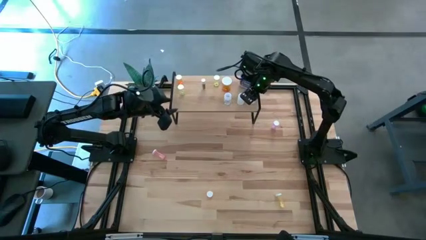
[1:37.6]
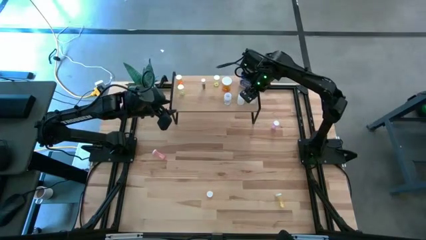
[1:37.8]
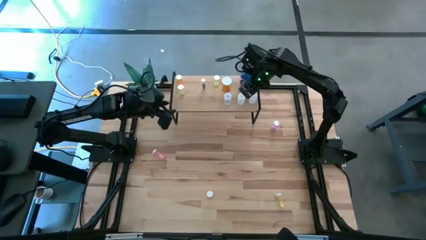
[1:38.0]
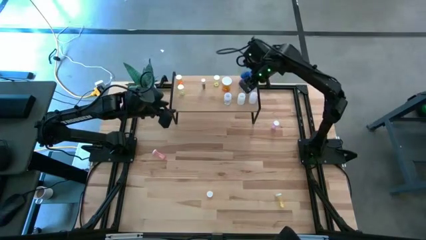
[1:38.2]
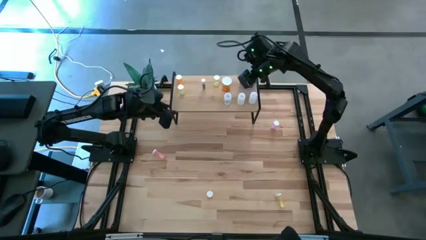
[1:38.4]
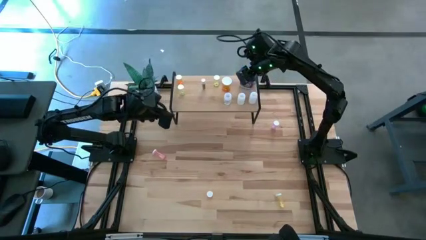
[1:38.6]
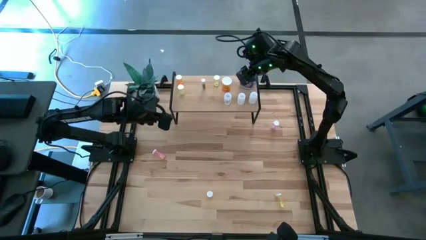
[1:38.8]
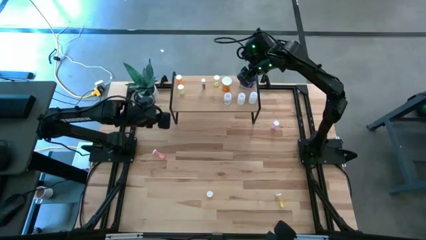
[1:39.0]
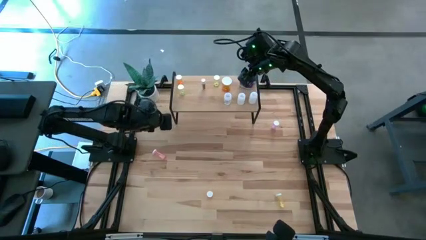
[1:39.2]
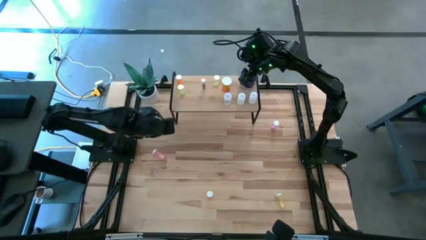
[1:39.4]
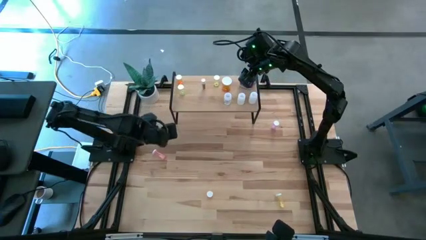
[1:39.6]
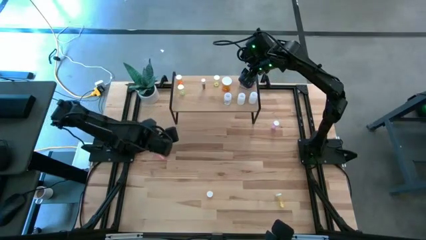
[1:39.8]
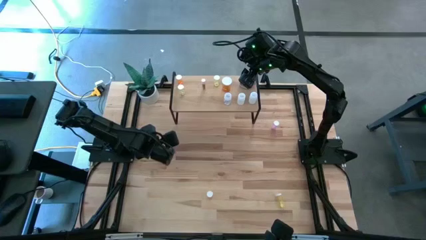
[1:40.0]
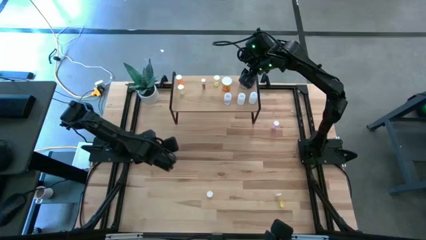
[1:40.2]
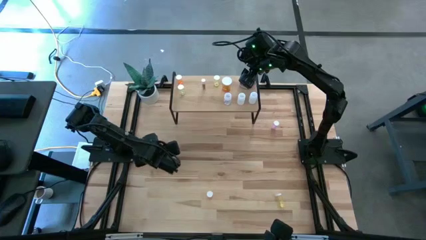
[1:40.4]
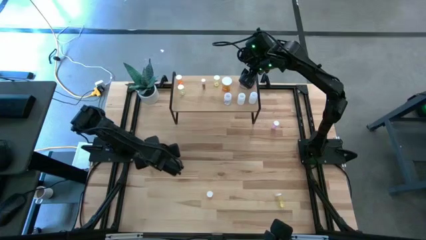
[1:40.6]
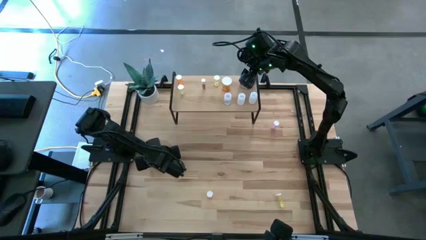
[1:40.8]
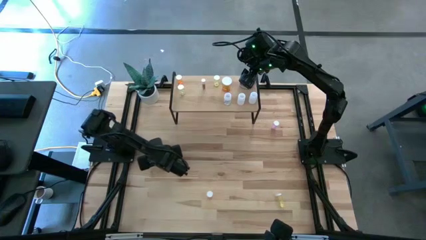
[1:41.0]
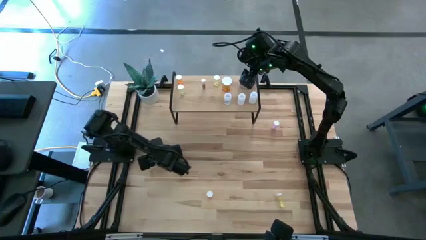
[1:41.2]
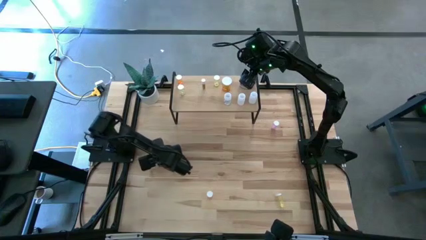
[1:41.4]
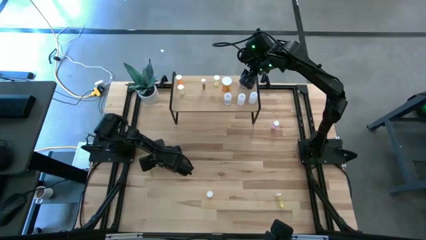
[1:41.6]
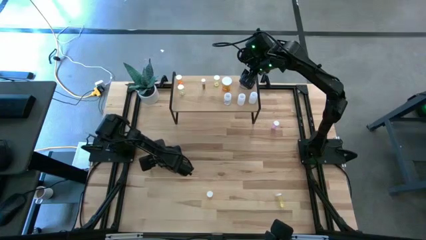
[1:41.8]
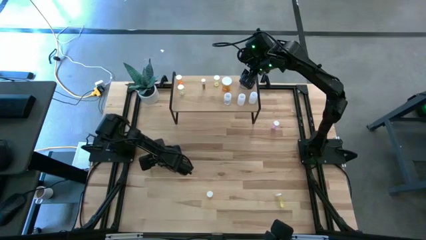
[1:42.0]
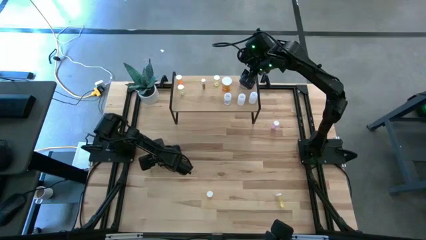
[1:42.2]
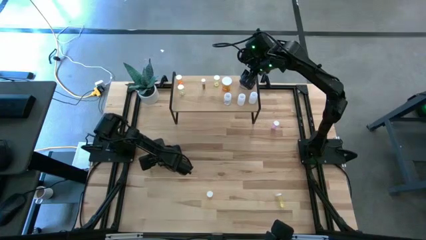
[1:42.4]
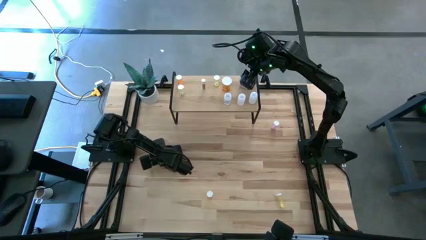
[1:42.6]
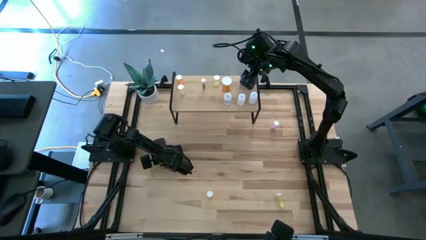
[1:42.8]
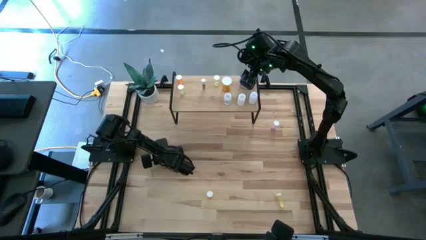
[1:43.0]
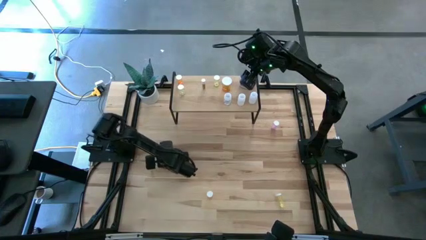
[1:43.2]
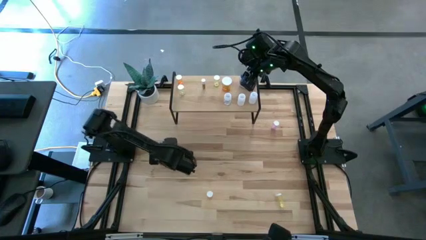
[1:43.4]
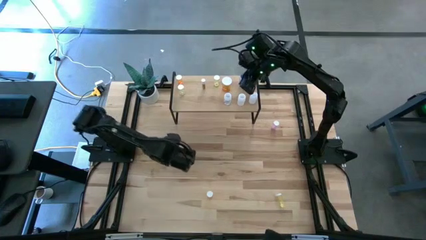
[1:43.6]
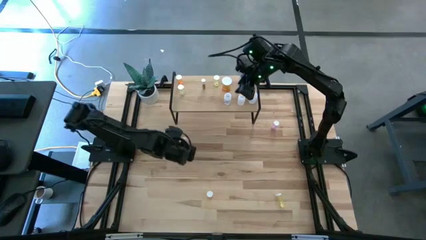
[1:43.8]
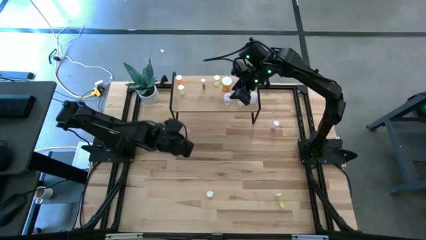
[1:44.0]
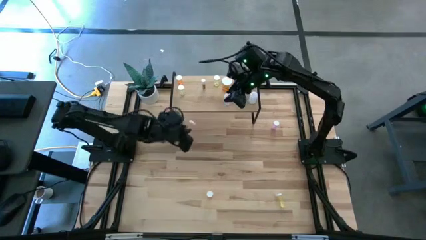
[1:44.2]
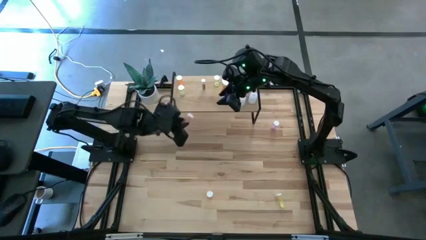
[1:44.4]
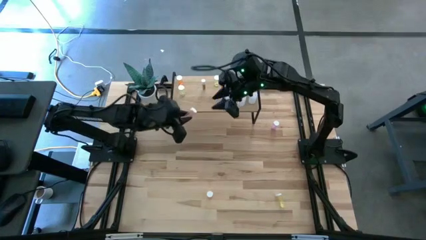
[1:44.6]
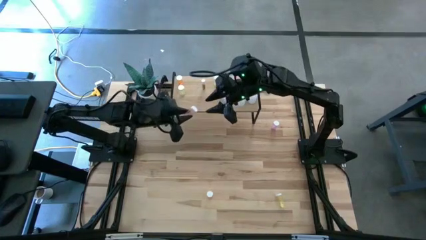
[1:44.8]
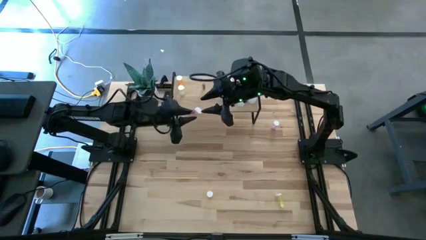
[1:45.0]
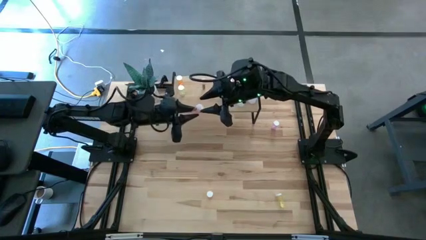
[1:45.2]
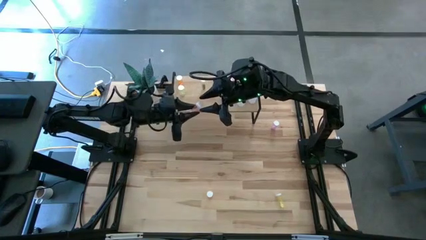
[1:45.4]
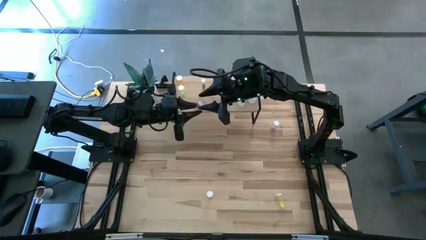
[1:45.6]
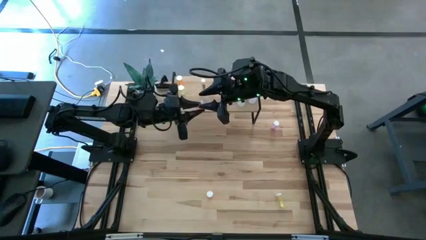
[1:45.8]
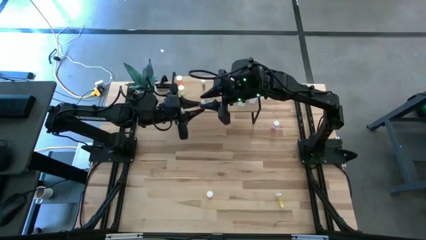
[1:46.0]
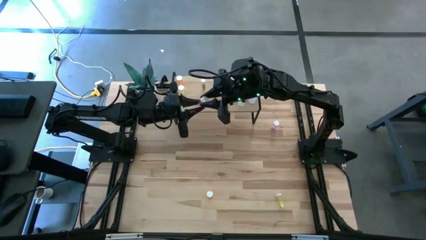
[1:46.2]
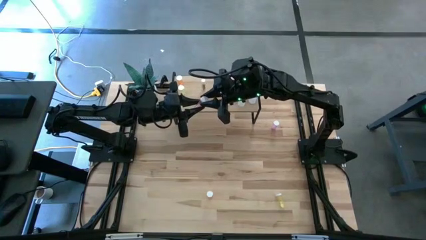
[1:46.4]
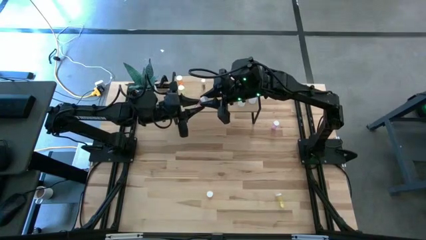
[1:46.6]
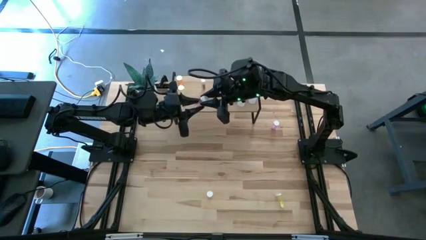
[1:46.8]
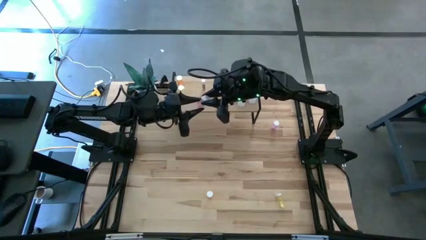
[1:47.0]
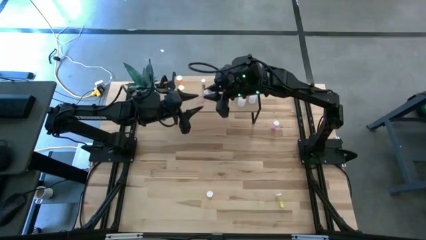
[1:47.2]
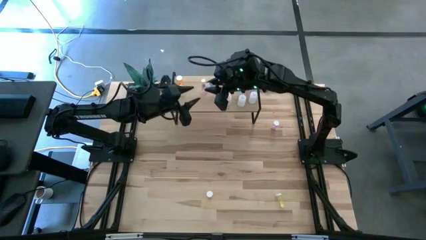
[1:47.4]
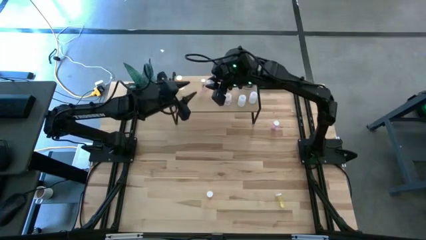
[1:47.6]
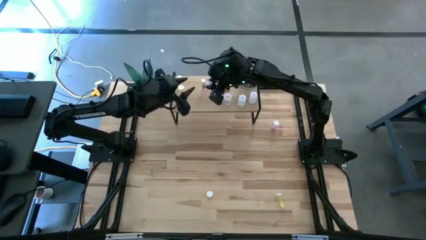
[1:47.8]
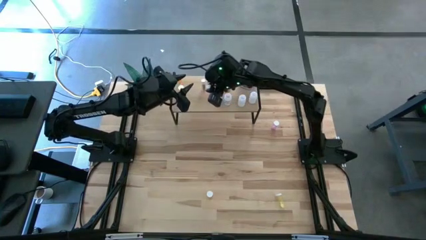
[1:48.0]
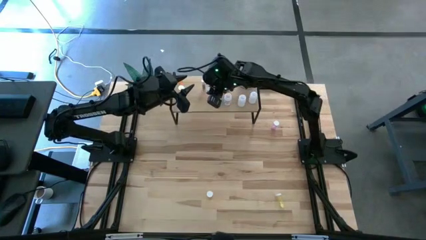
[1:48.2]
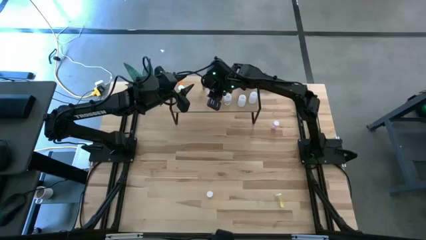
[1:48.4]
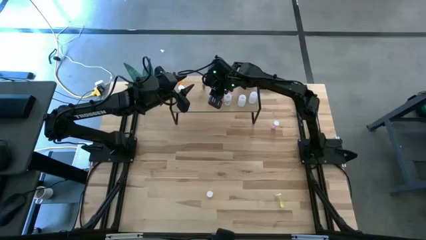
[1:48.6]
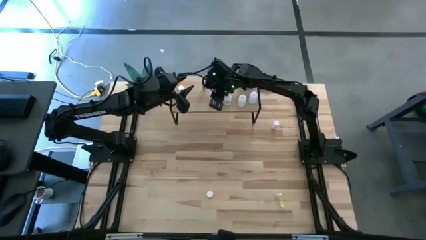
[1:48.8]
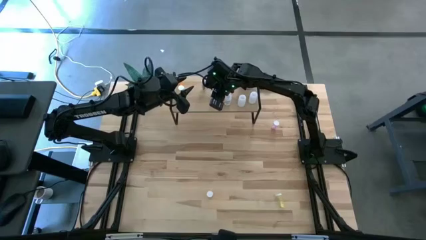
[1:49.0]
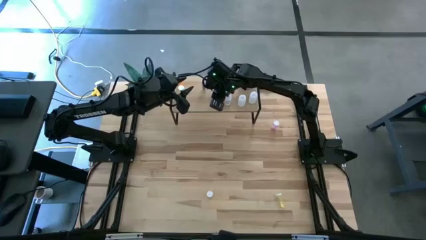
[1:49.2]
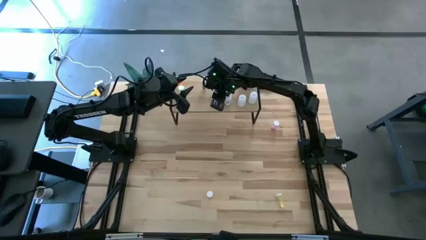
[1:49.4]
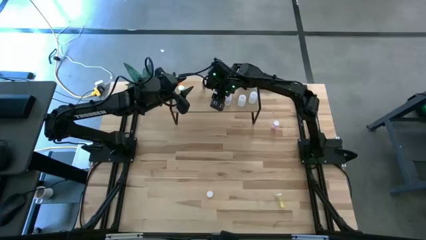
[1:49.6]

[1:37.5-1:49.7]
Task: Pick and place medicine bottles onto shelf by color
Put the pink pill bottle on the shelf

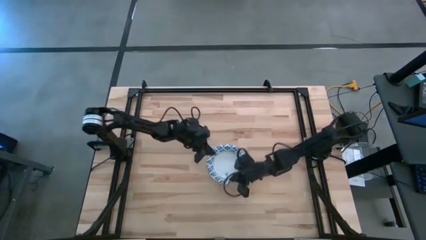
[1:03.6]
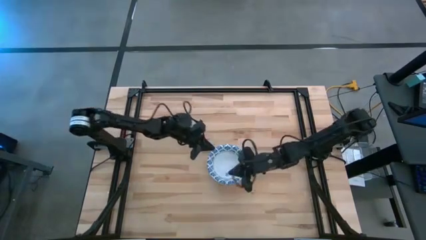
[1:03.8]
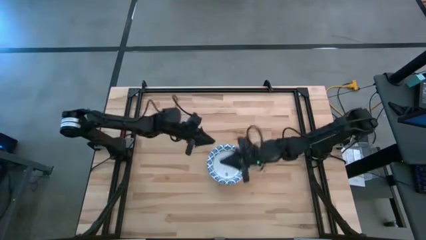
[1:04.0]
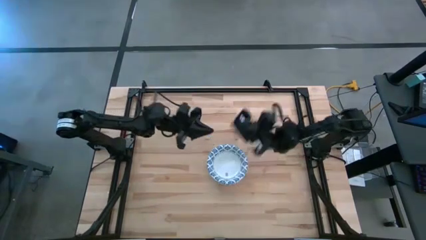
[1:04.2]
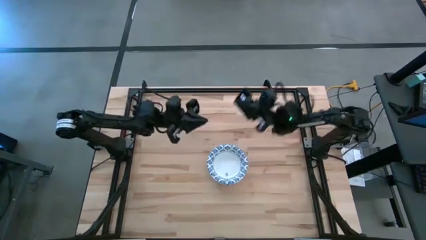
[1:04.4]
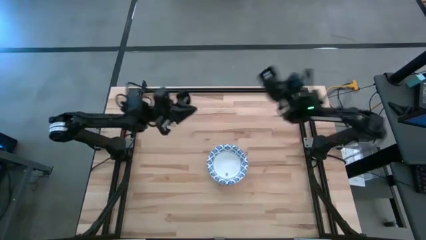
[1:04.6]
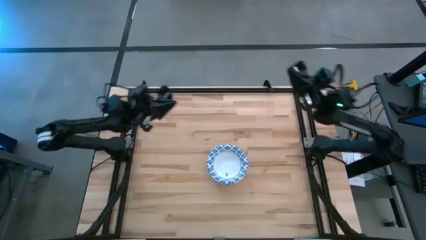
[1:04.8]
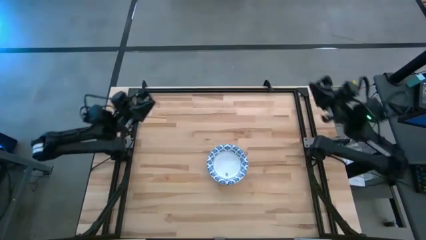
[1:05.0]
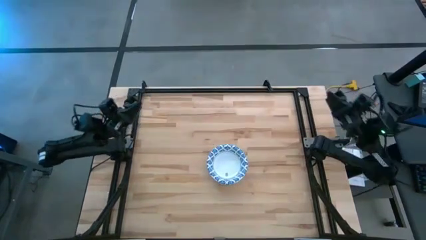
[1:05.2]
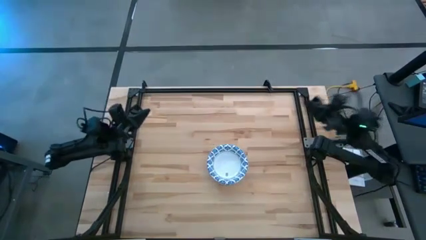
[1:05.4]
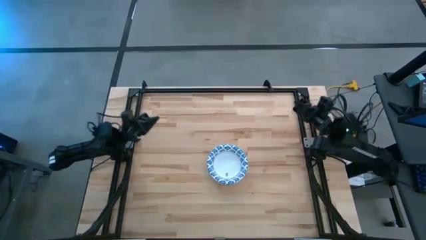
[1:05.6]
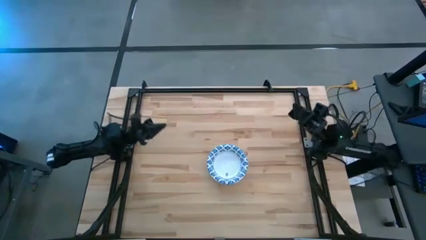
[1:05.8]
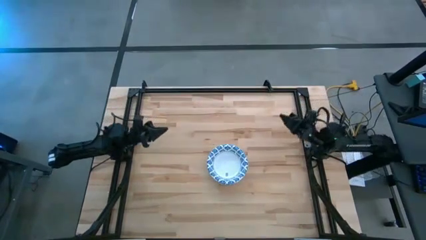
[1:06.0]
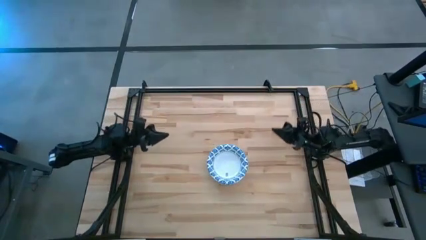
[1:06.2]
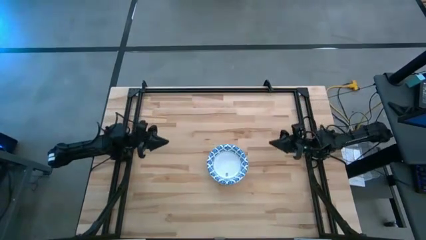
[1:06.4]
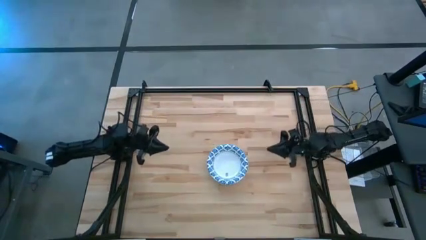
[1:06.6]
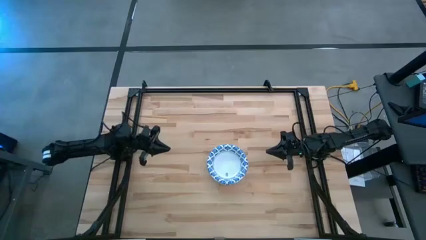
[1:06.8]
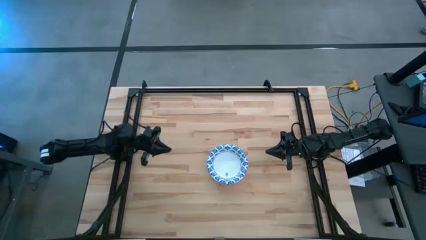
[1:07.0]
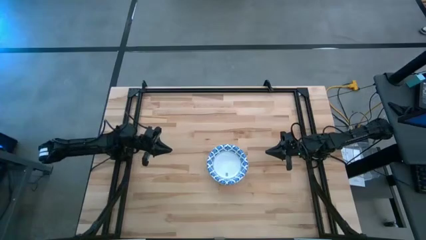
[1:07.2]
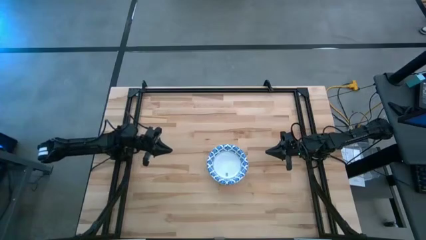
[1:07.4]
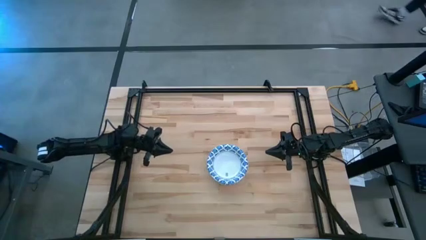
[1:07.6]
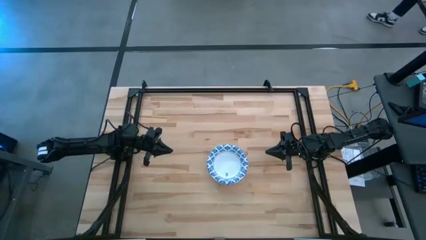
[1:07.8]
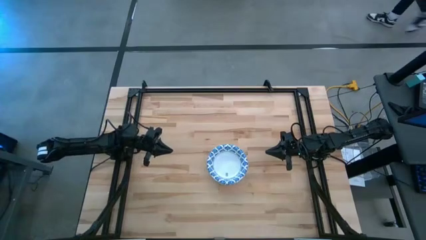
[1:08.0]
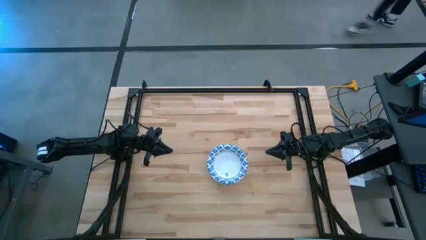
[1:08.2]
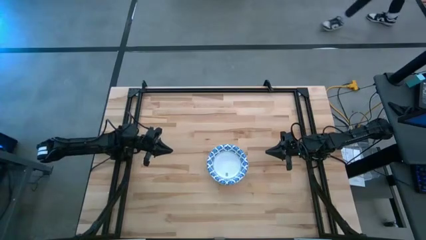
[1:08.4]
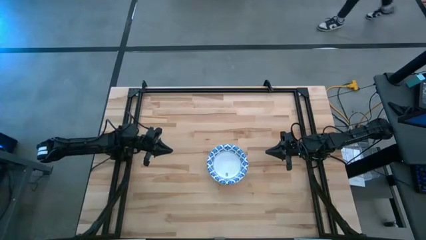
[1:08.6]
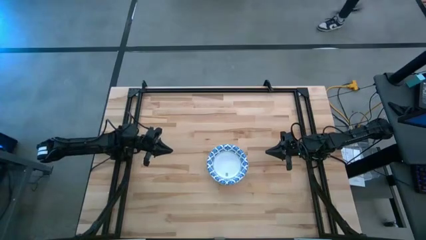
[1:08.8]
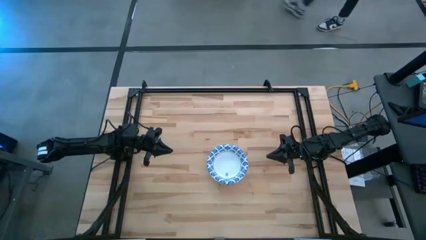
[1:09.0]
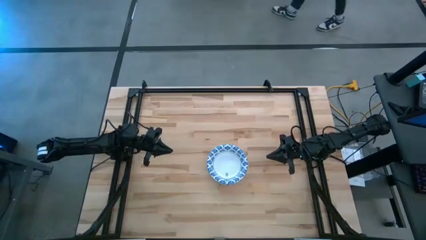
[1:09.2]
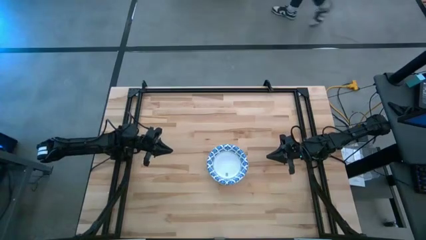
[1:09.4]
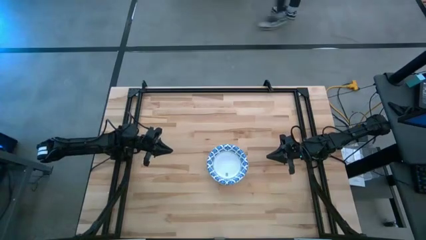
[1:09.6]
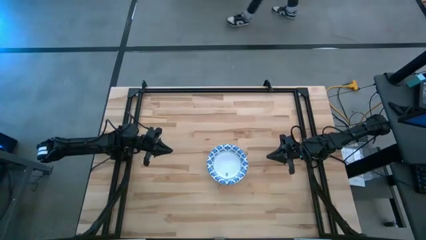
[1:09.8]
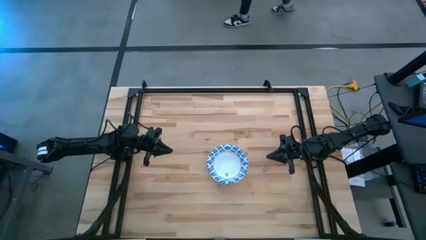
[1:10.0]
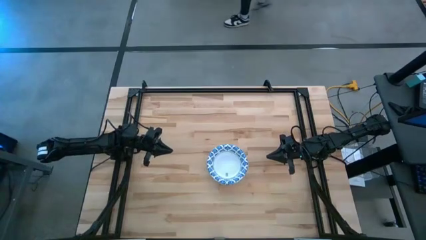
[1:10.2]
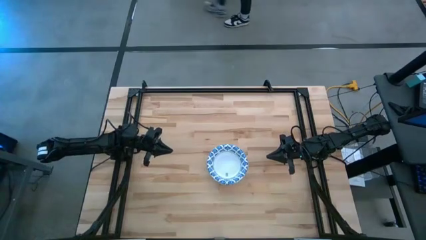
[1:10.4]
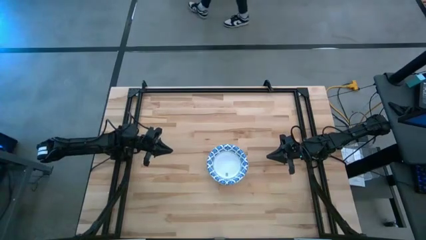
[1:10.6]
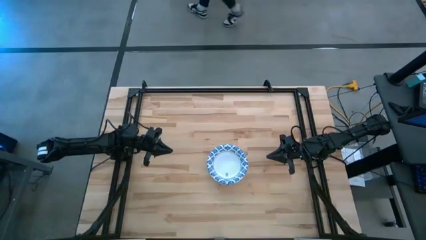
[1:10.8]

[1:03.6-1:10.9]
Task: Nest bowls inside each other
Return to Home Position
